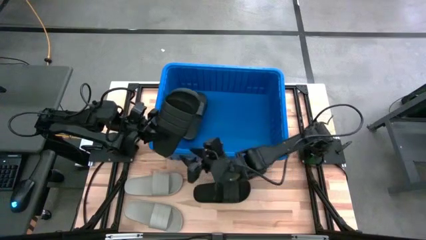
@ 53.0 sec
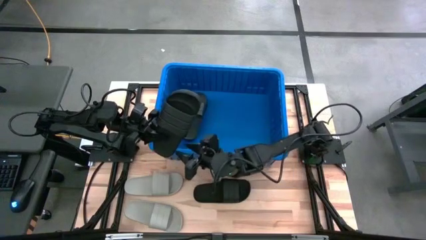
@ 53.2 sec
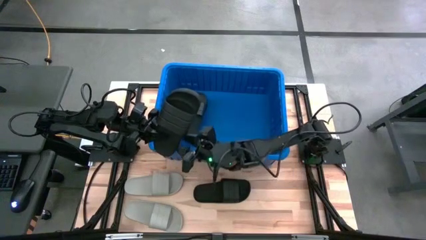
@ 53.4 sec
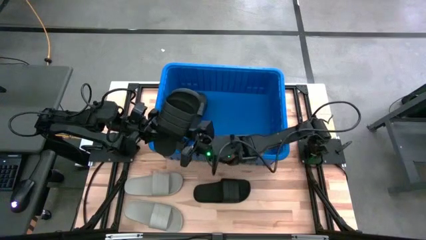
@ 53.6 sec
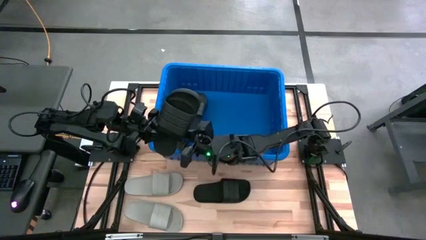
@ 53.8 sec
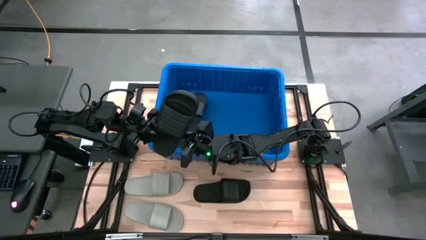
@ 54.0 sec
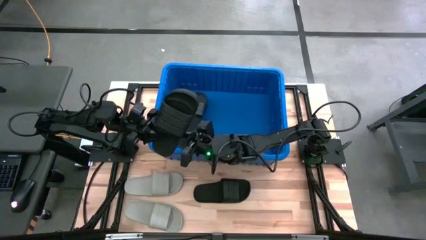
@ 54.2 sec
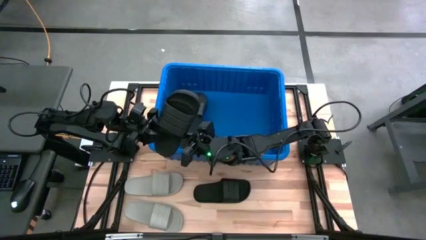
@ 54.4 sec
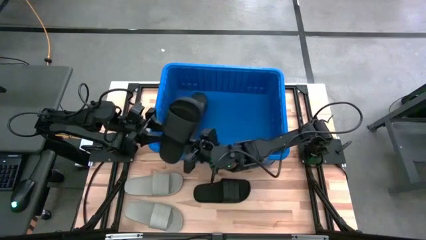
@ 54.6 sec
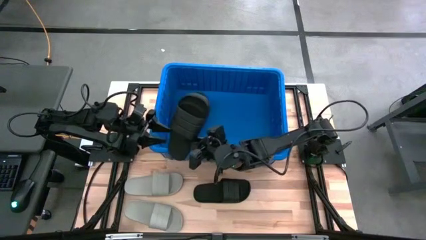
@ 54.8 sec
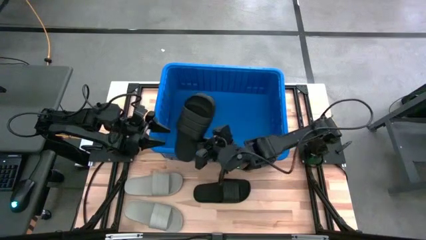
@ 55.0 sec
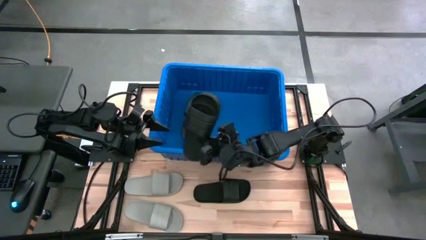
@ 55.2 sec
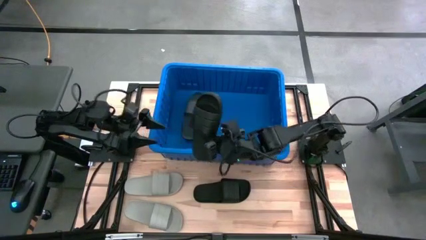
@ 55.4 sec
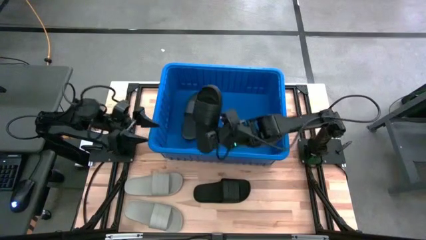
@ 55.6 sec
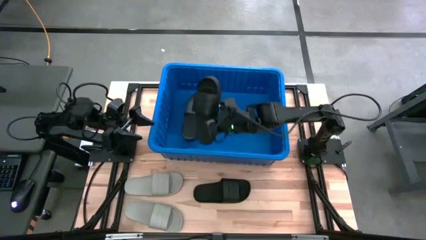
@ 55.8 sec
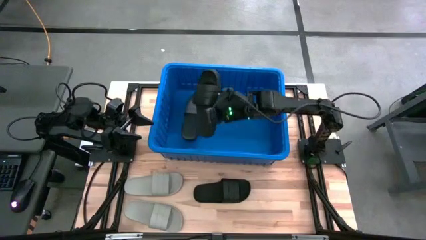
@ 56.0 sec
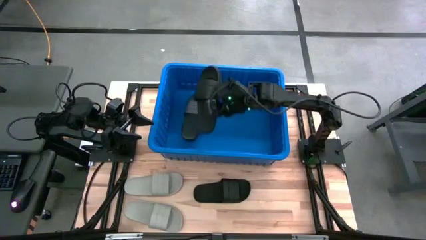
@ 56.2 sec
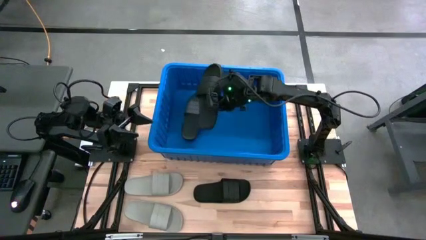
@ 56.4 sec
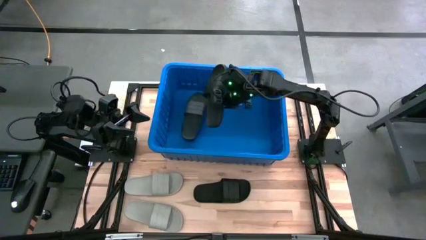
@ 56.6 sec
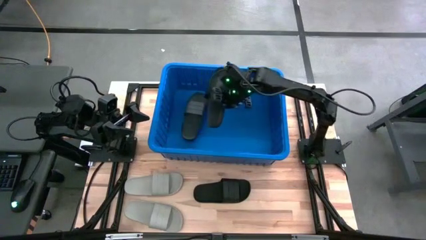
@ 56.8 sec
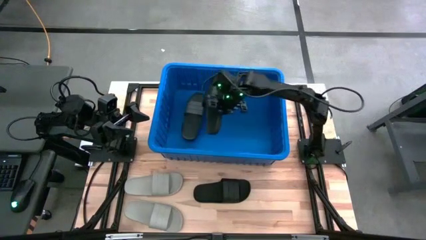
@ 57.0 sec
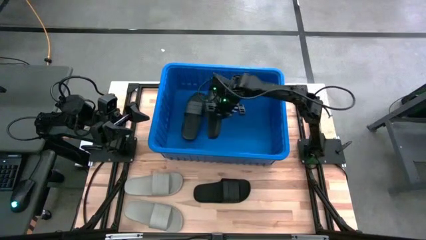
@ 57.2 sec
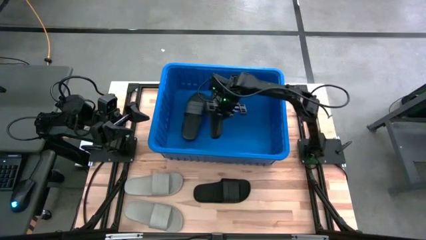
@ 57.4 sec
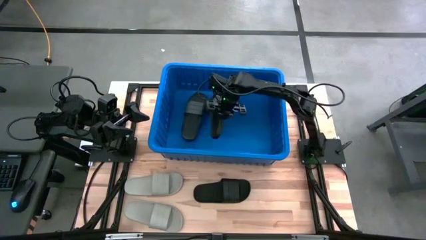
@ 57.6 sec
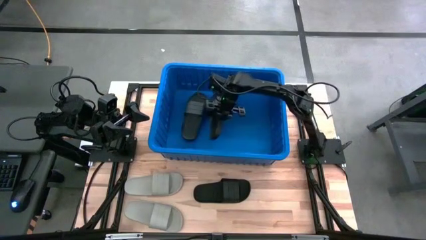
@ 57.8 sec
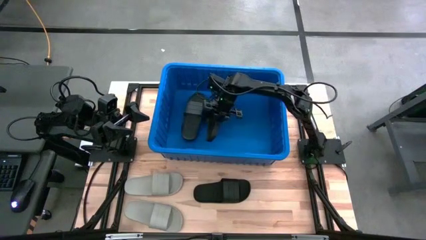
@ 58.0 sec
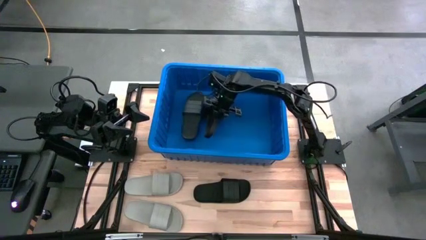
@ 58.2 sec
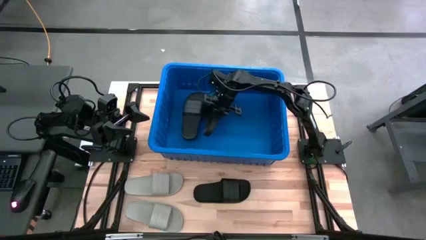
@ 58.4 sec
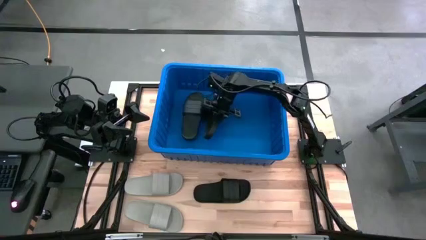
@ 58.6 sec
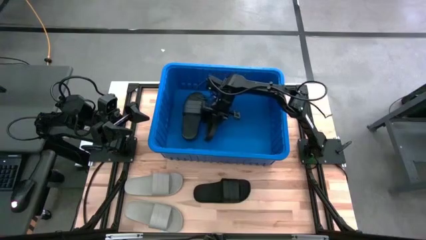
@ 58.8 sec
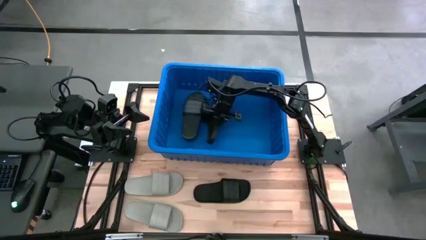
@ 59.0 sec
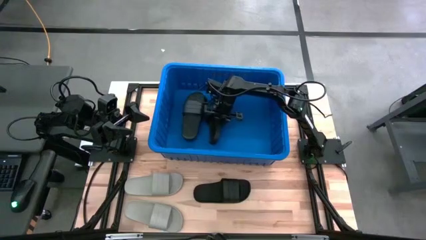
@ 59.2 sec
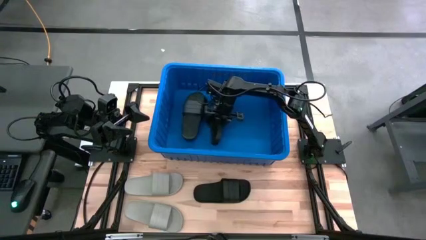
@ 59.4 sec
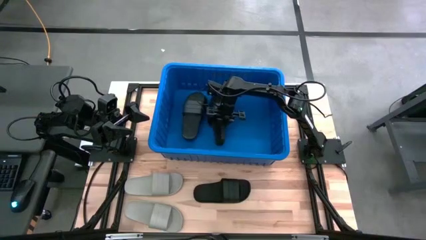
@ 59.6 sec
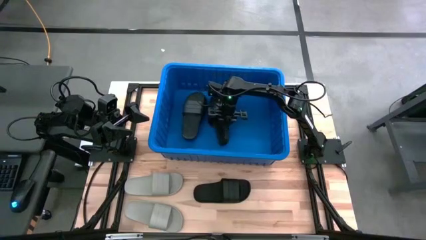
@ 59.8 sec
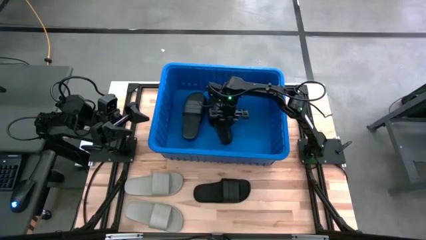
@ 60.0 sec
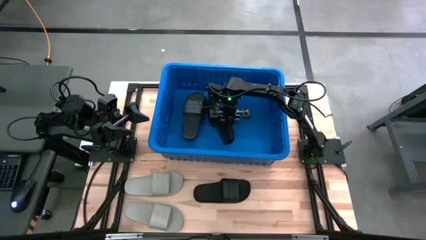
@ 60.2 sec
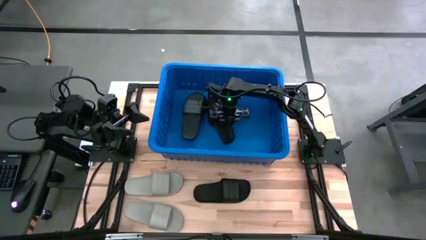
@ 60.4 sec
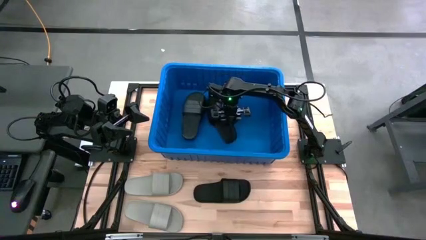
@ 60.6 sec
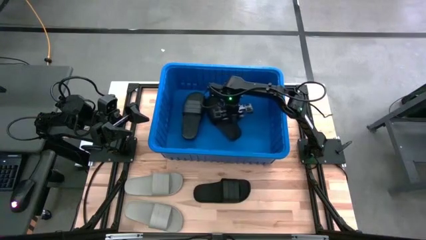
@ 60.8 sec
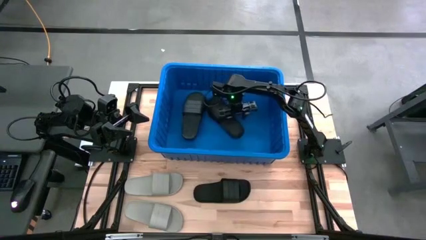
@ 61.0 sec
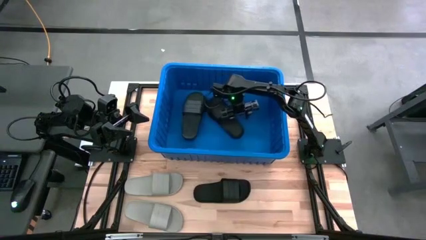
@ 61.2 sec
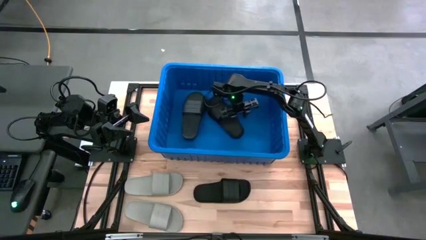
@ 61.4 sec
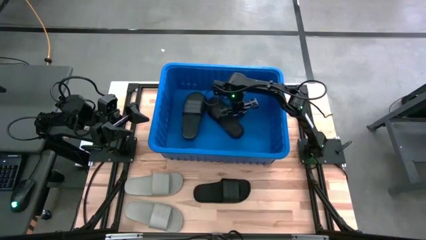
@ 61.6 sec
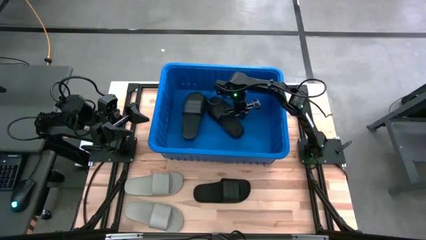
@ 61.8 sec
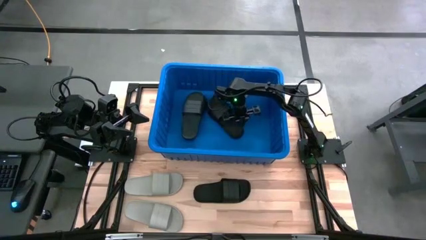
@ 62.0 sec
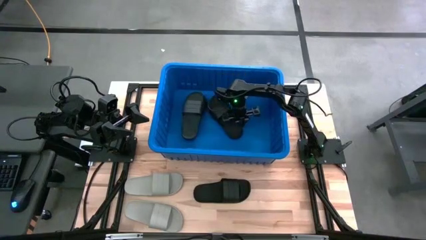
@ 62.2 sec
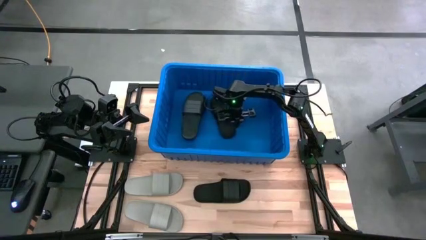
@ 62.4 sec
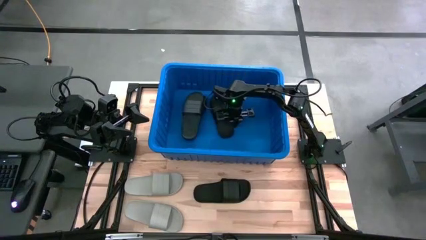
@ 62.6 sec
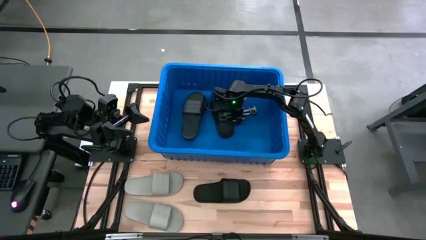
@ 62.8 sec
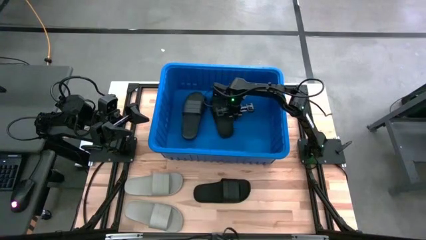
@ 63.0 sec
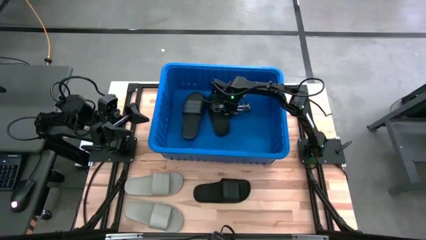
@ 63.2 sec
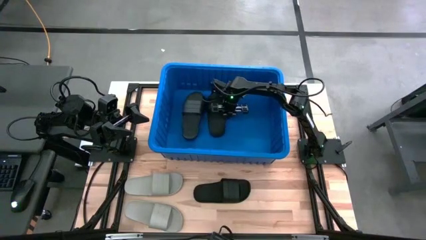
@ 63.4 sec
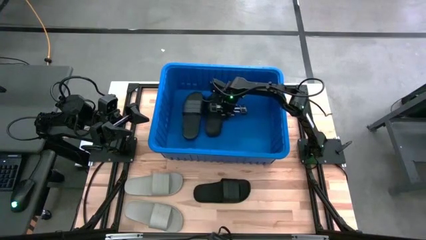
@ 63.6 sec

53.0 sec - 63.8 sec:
Task: Pick and place slides into bin
Put the bottom black slide into the blue bin
